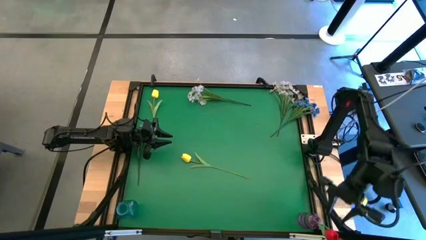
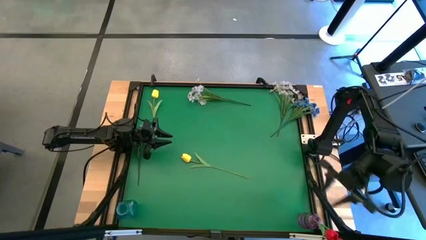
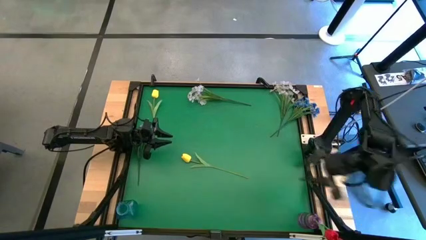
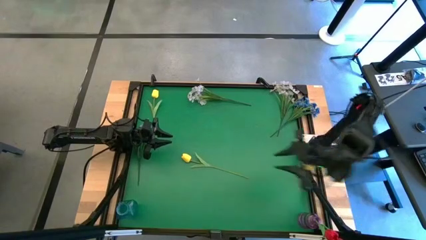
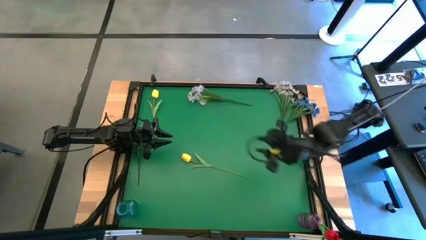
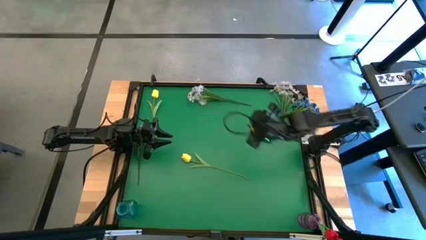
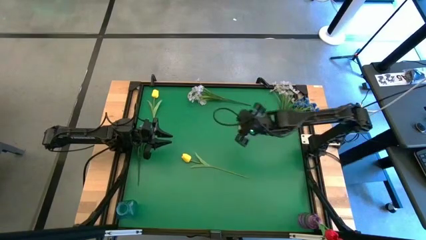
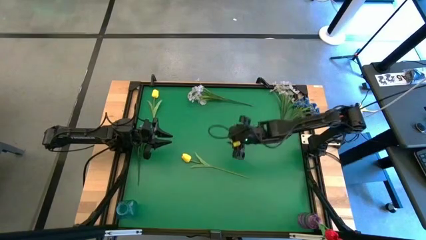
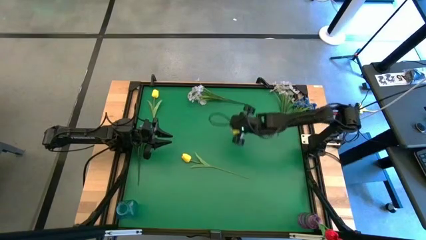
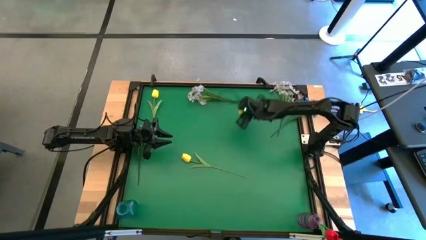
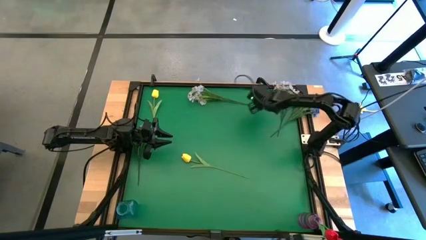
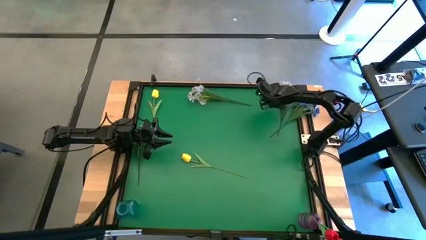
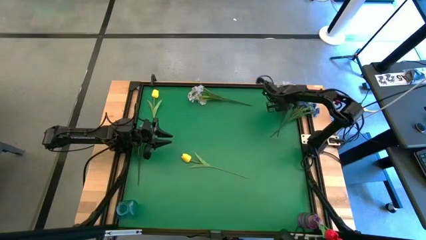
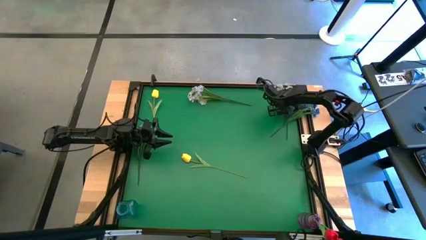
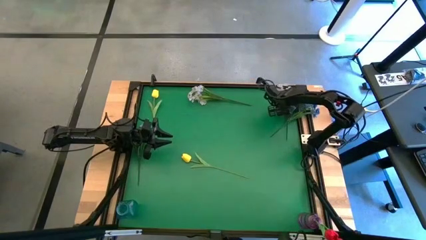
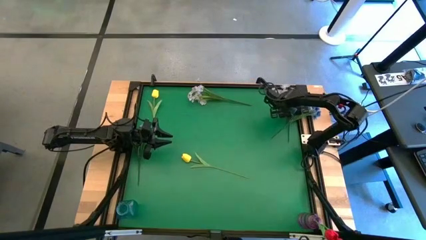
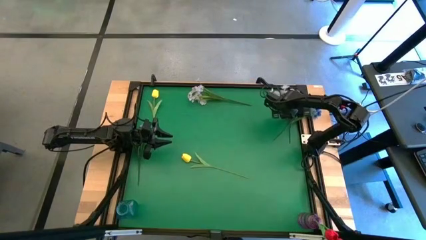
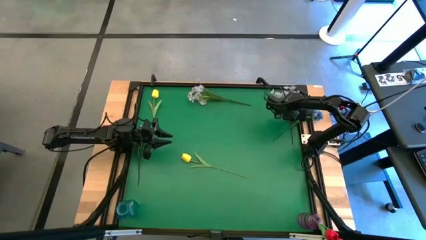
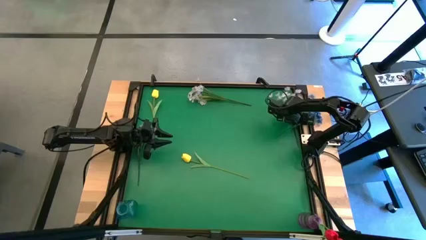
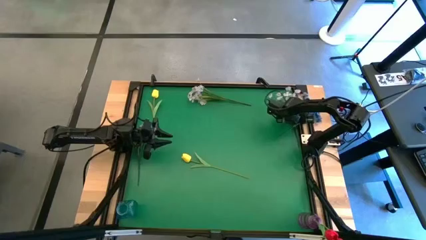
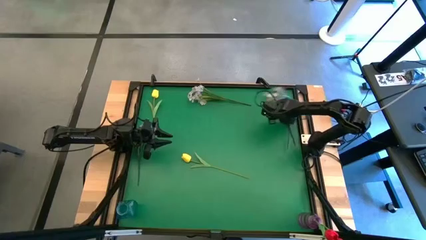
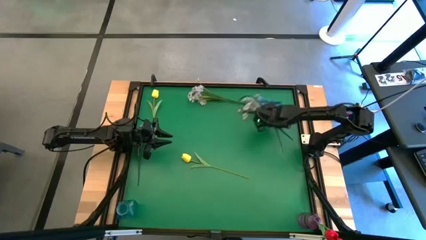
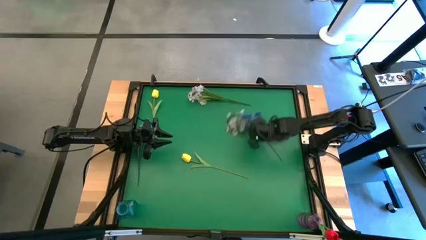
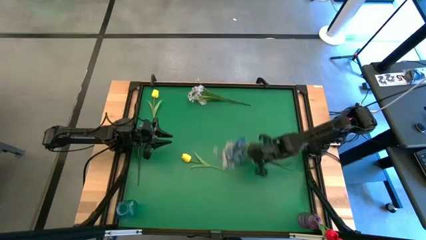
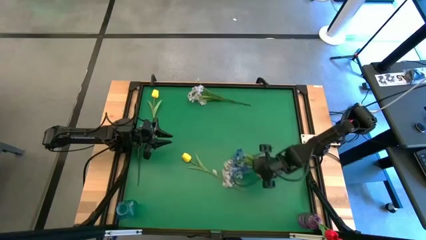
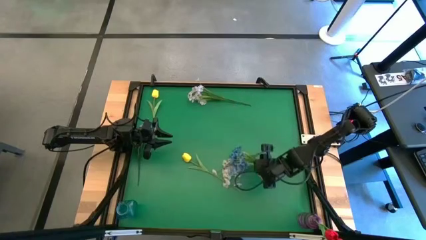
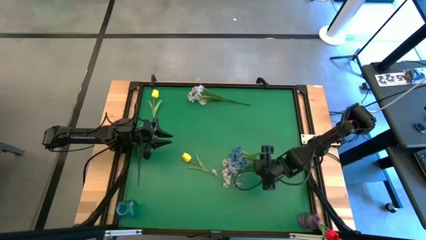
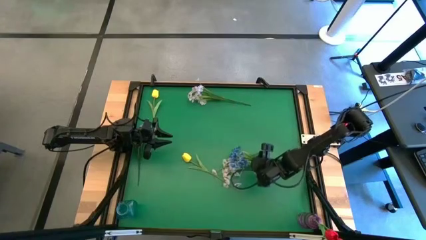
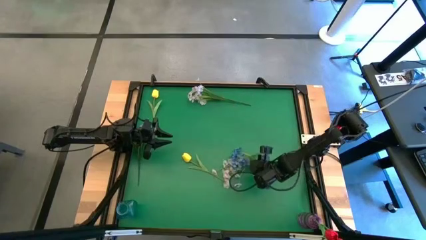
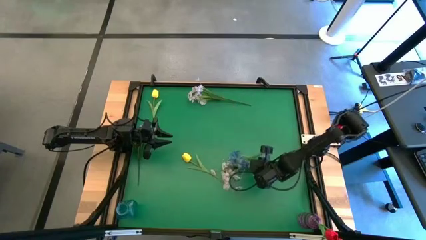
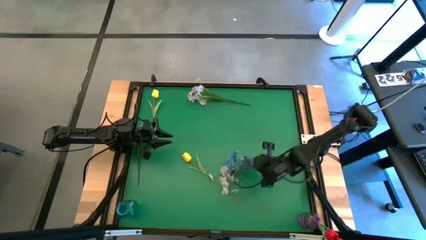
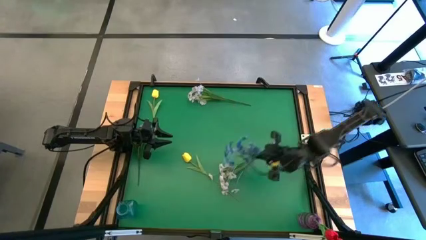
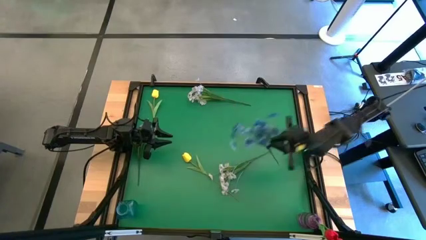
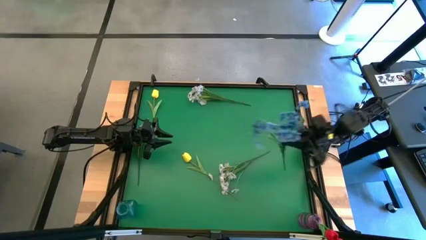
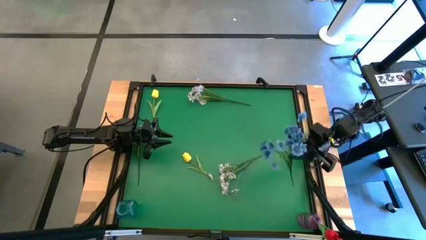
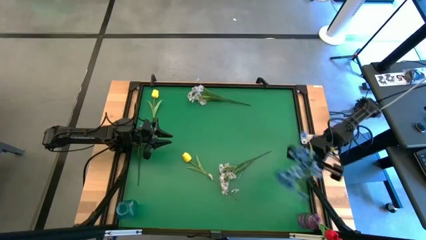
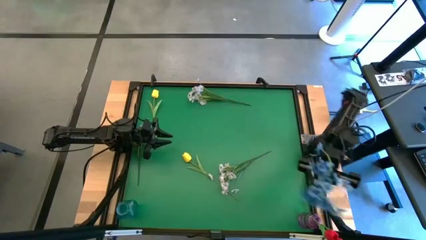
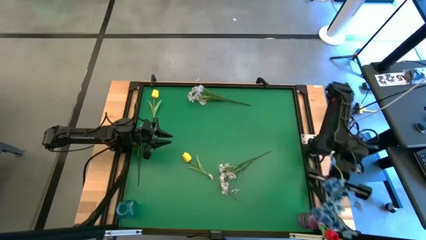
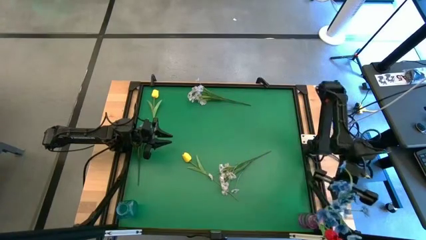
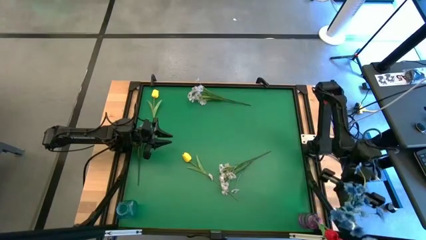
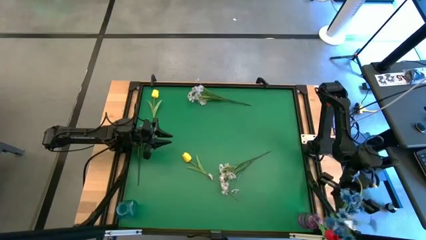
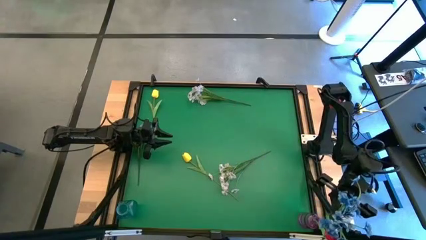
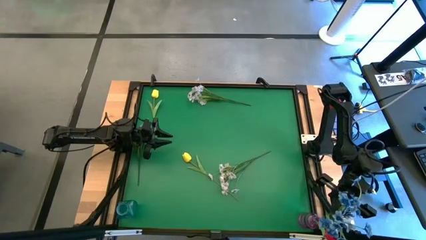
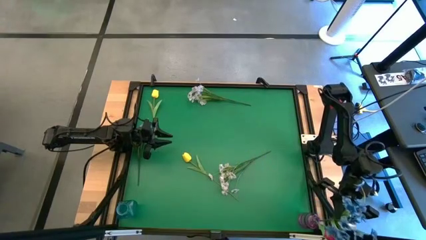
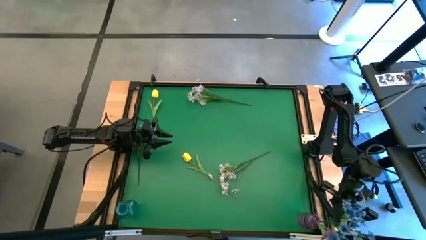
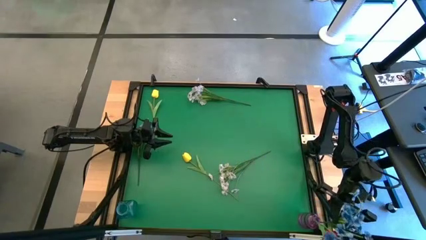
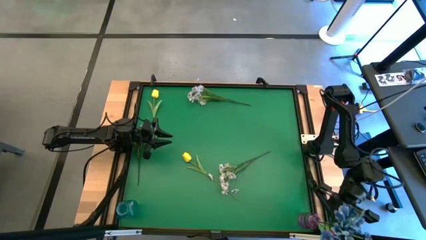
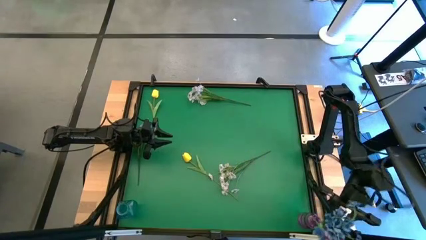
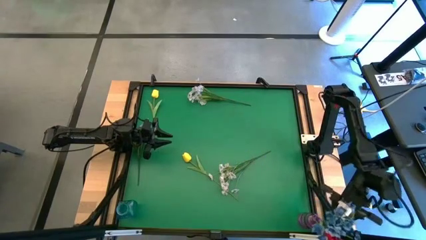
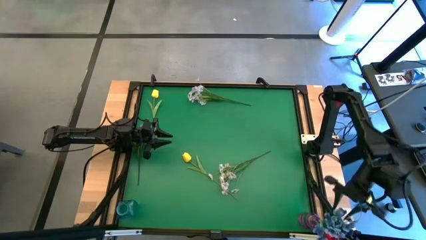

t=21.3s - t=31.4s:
Task: Sort flowers into vase by color
Put the right blue flowers into the purple vase

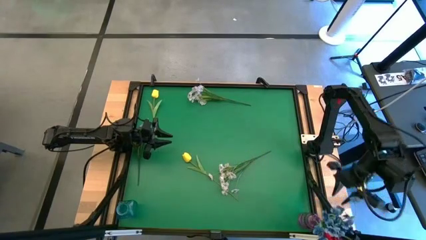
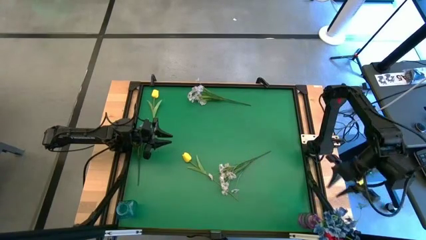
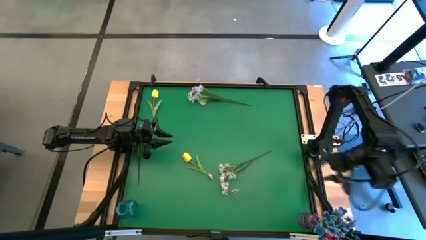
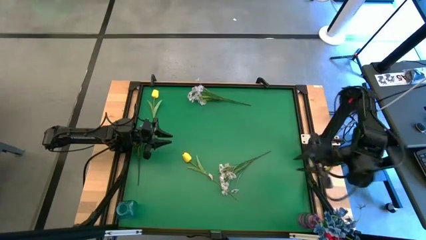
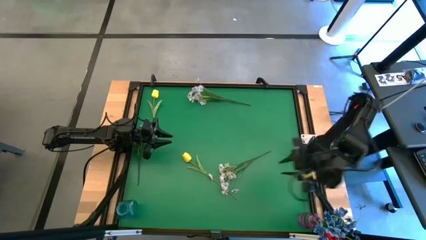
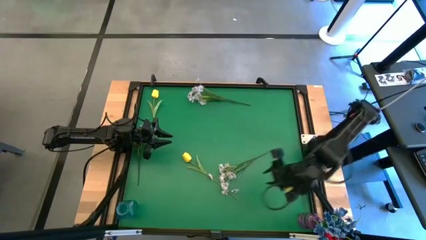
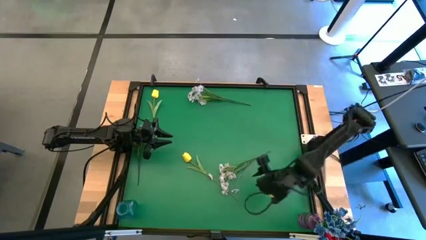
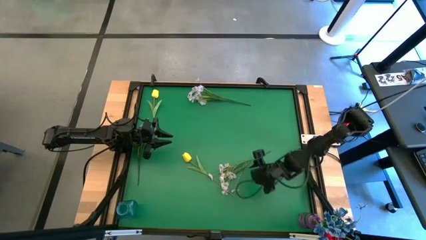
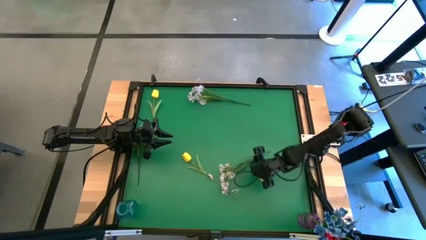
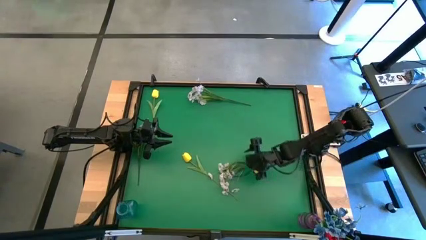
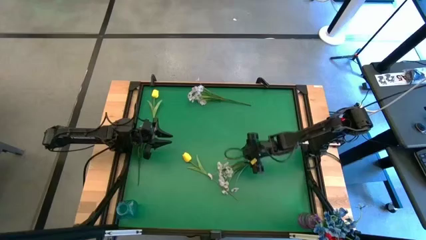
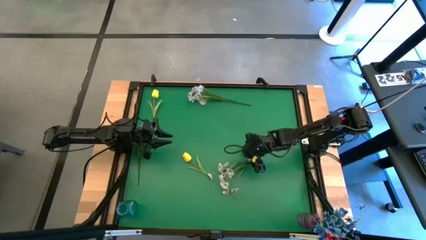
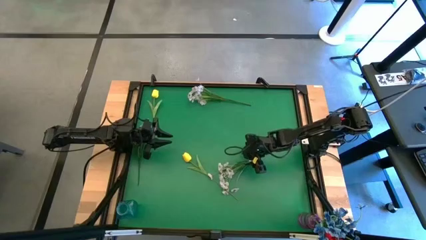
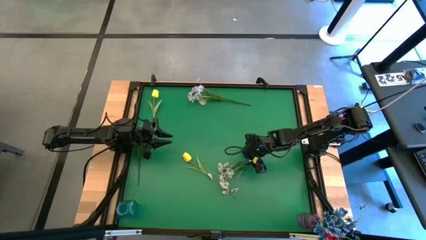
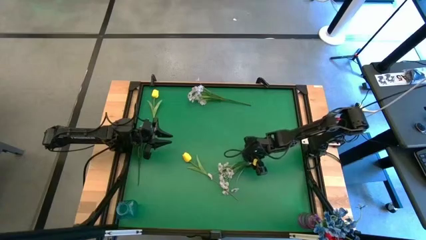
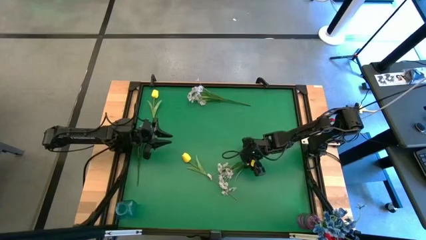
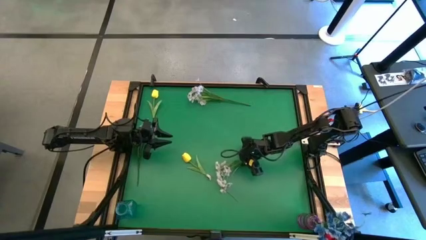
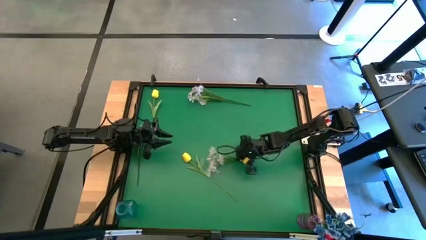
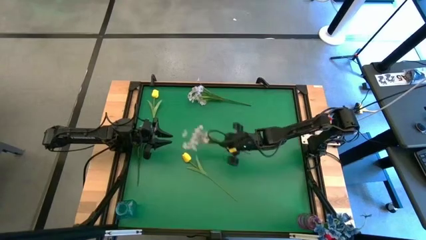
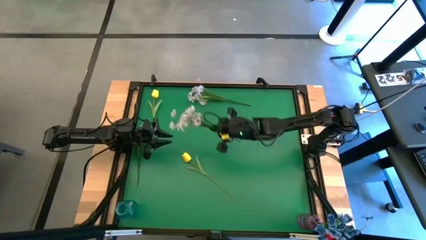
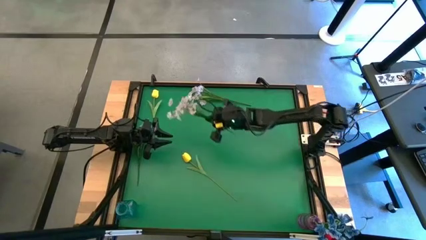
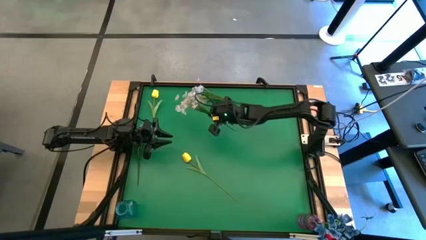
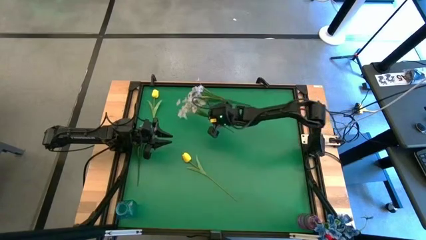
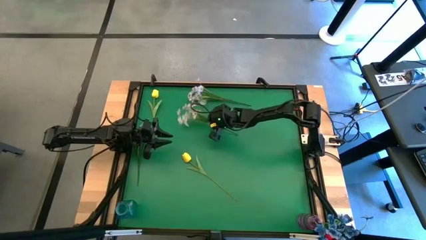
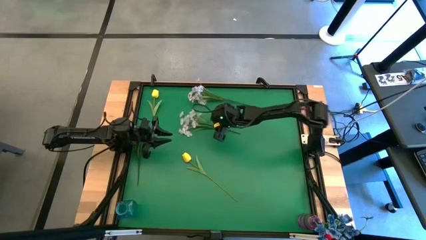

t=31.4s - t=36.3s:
Move the white flower from the bottom to the top middle of the table
